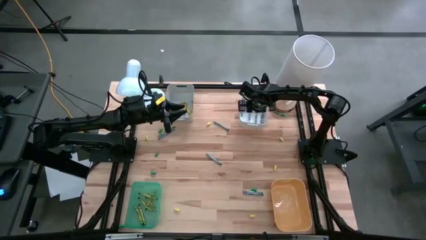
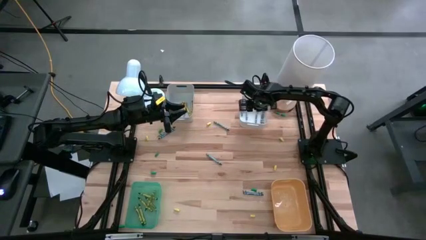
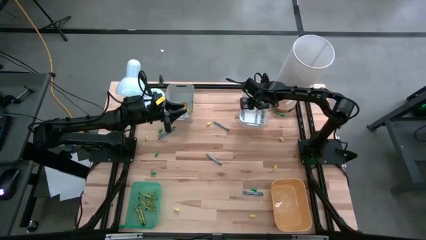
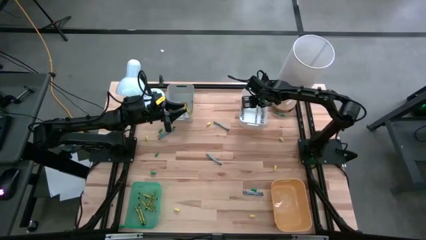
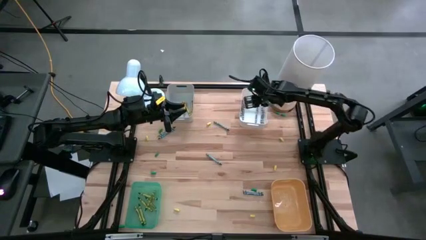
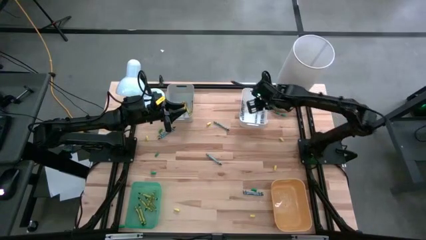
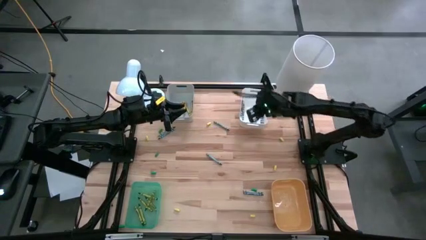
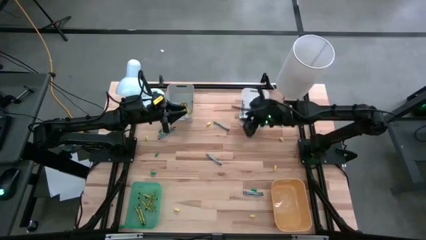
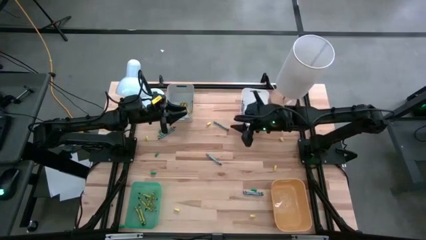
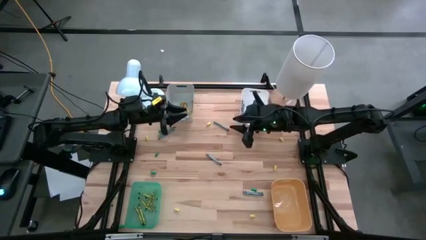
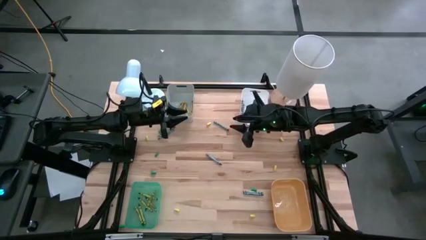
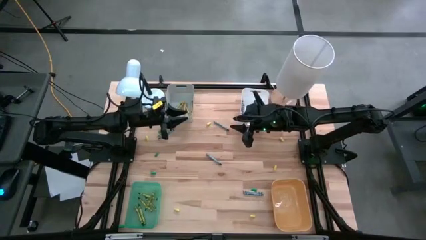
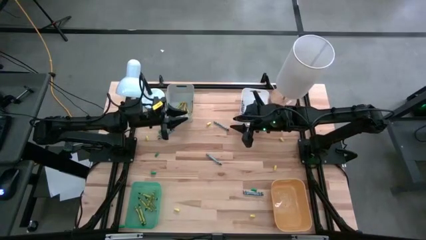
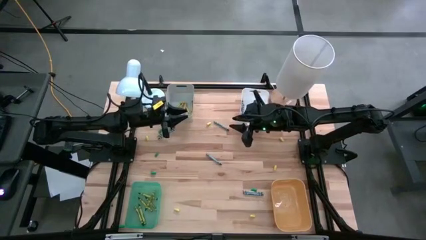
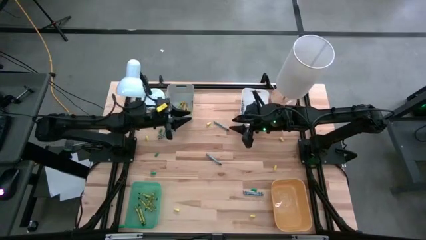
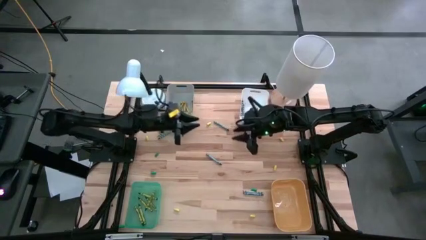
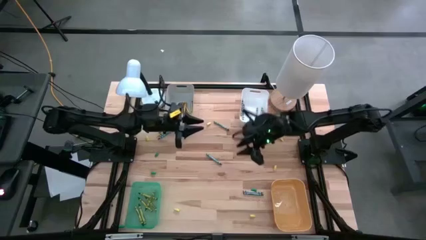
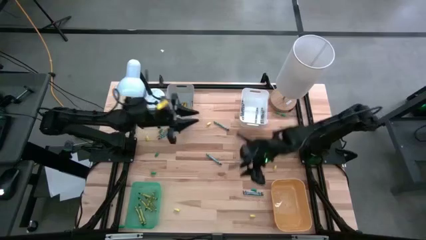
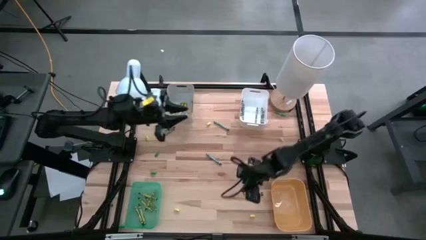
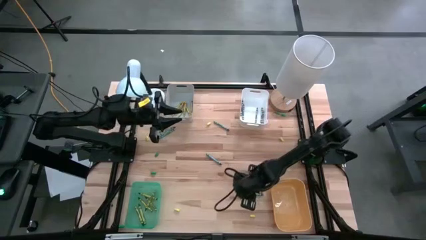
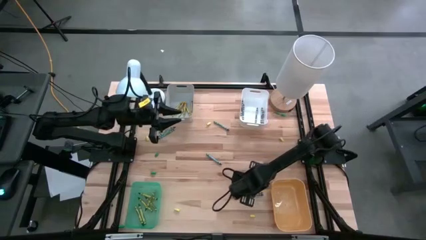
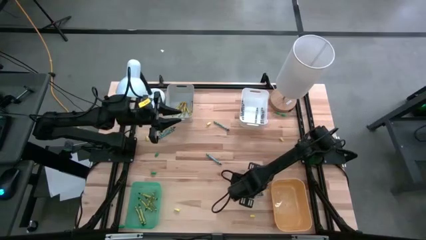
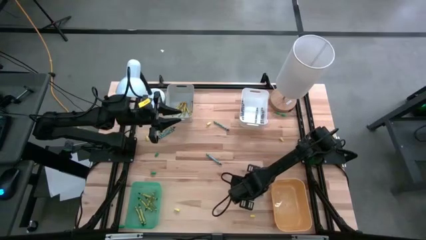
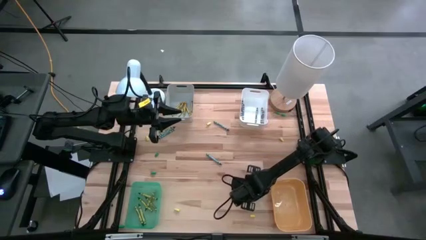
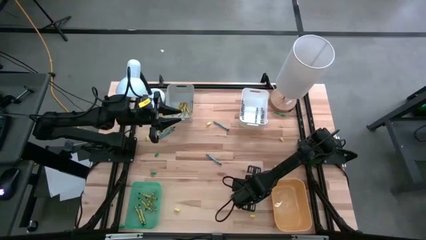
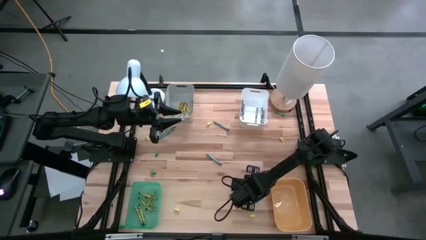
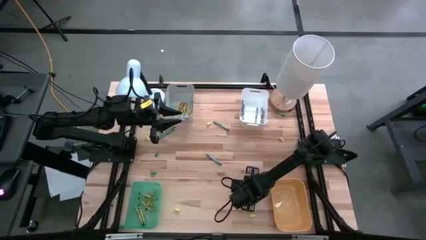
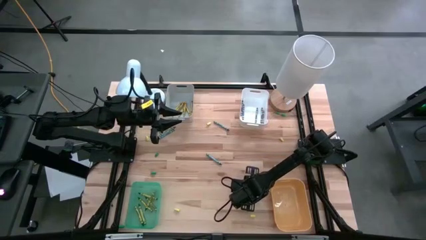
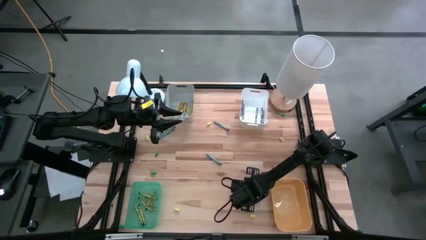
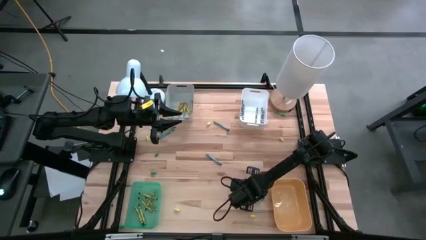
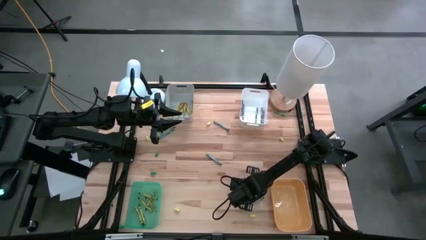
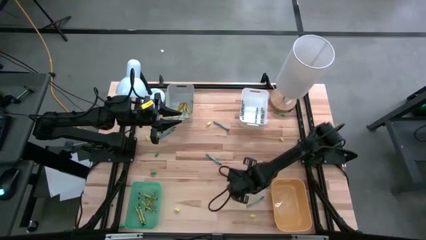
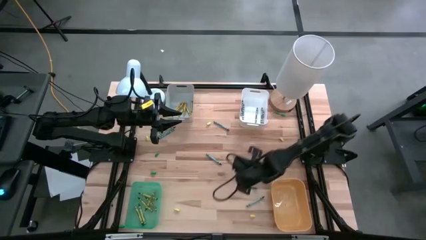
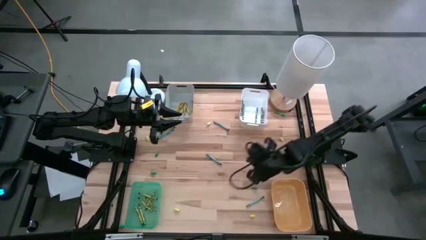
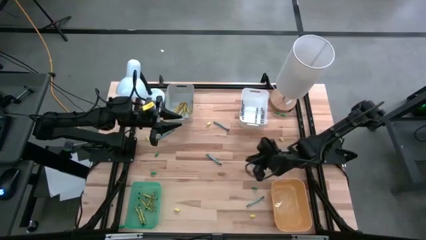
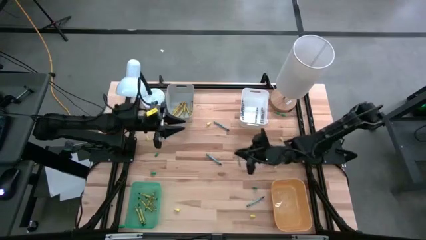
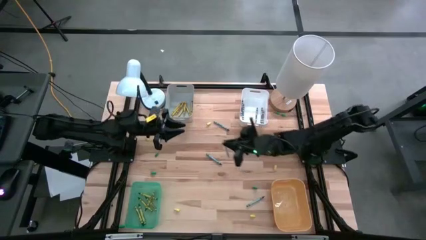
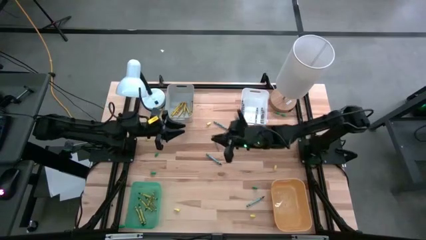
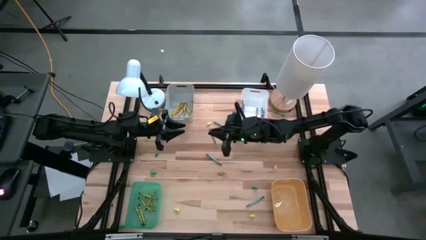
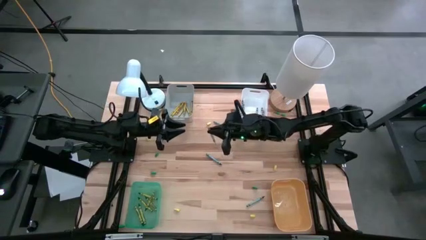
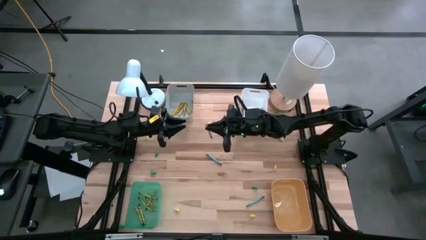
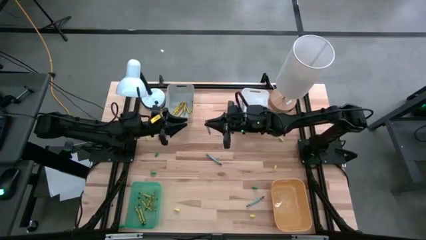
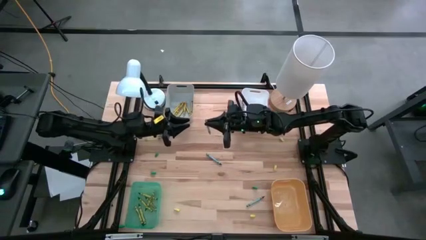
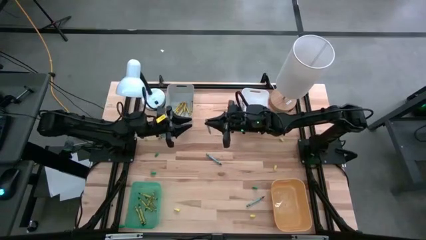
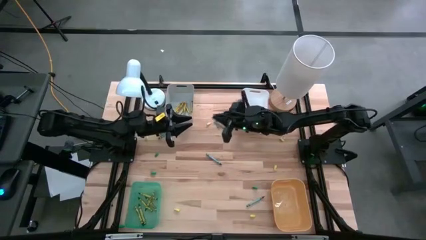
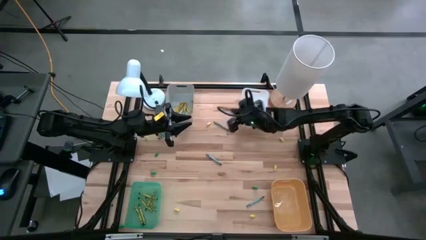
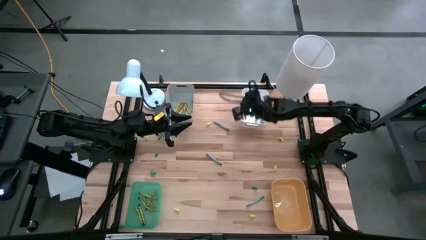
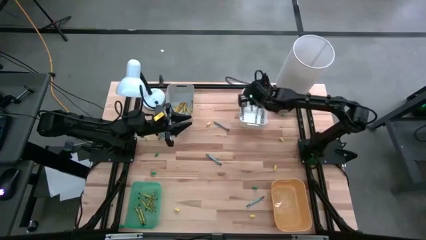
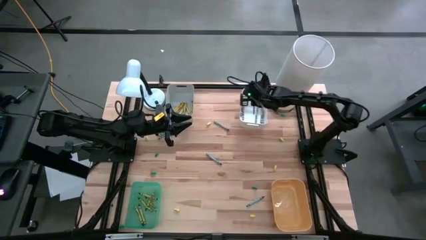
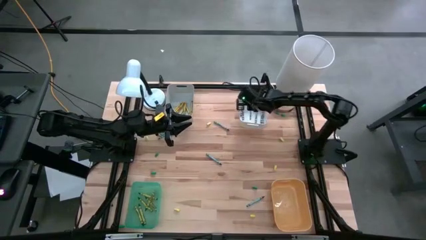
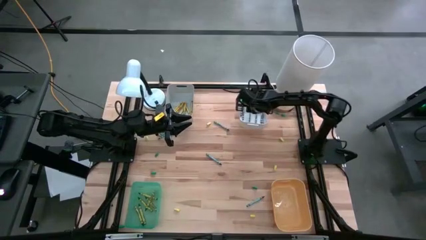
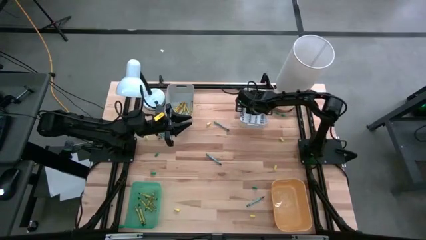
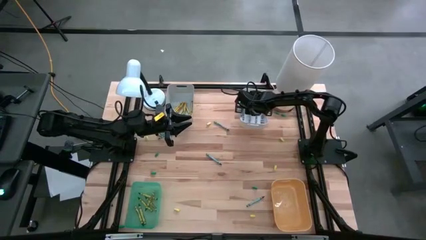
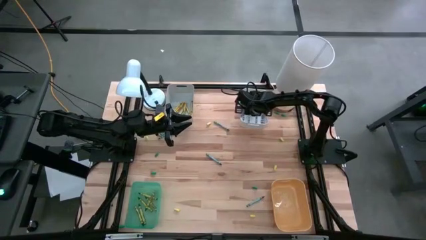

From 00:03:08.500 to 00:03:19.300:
Task: Sort crayons
Put the gray crayon into the white bin
